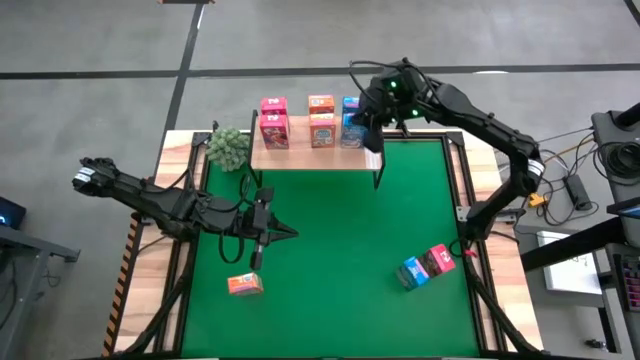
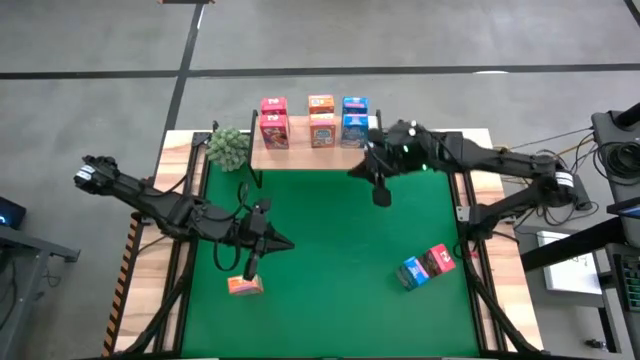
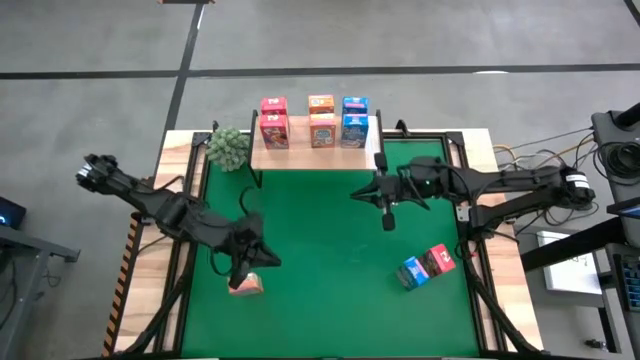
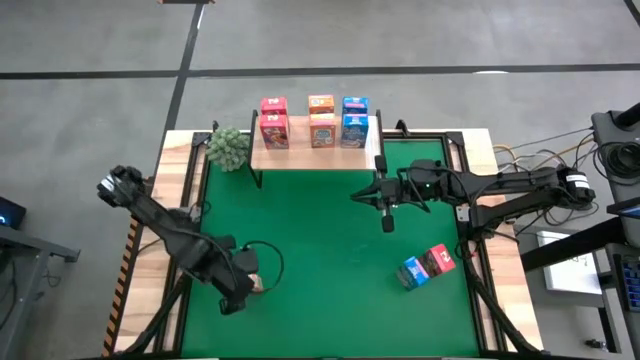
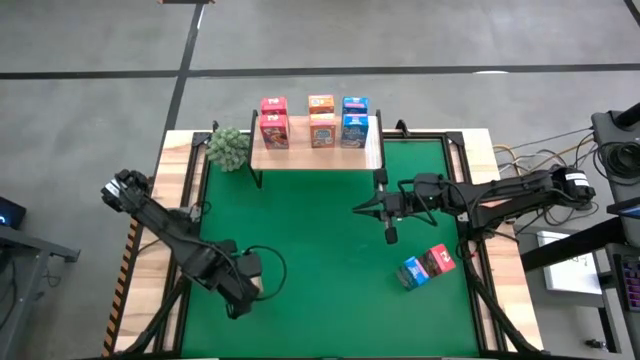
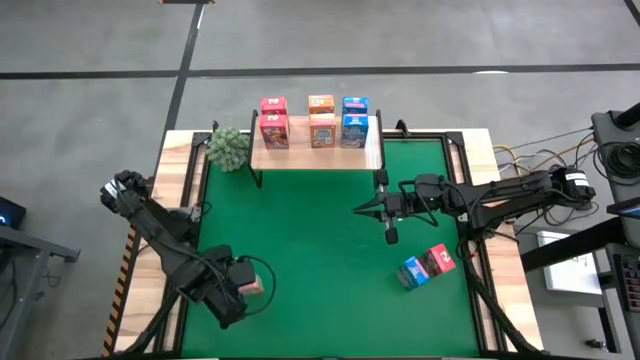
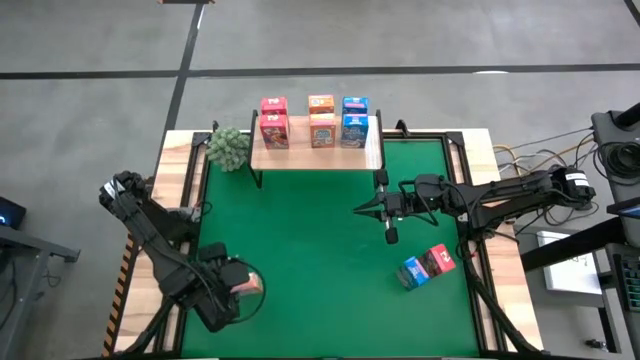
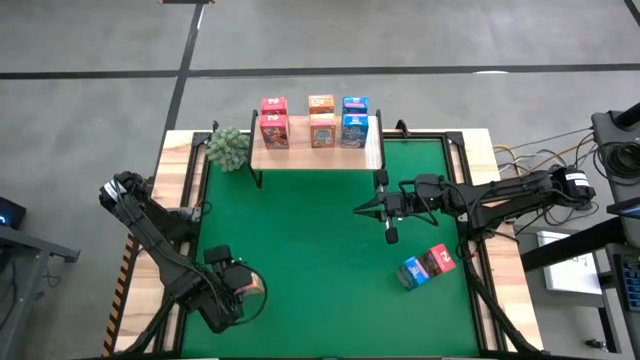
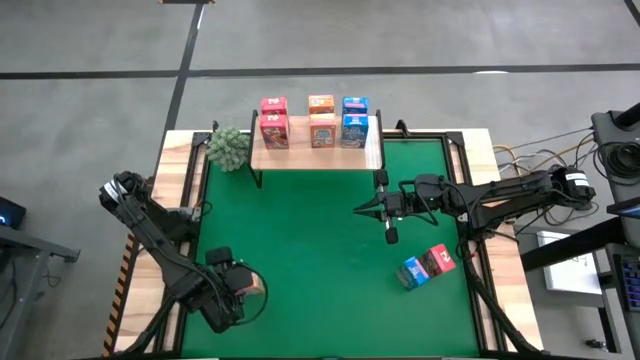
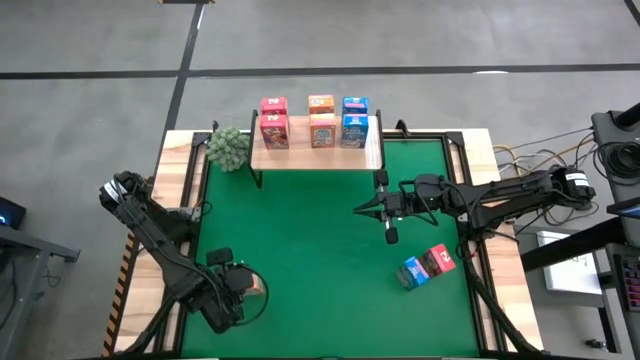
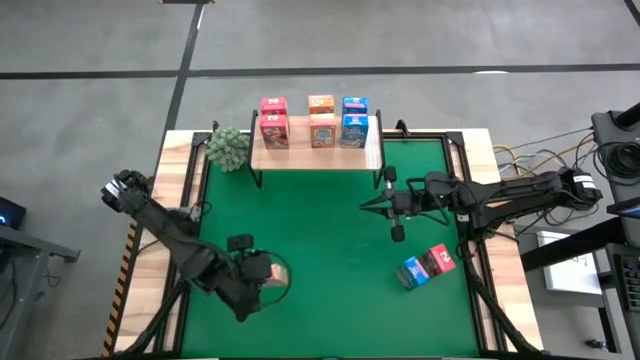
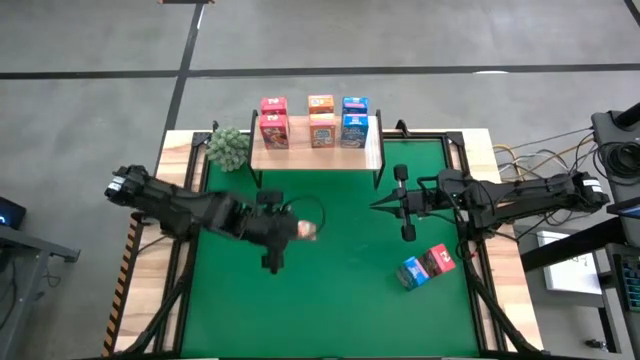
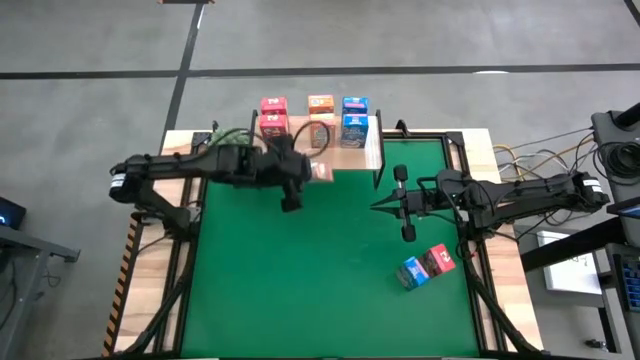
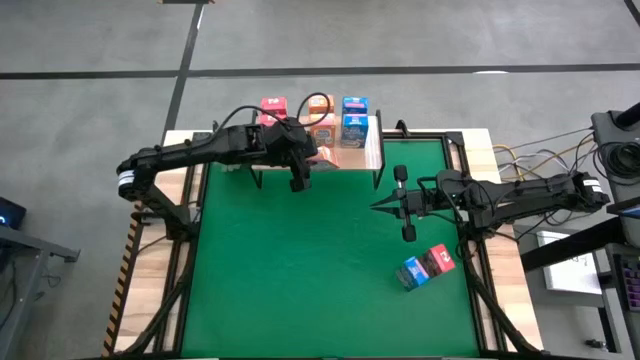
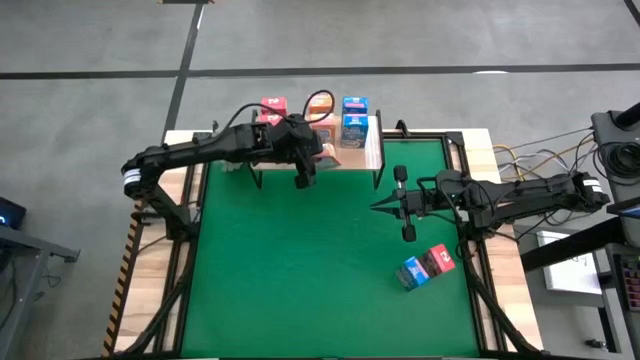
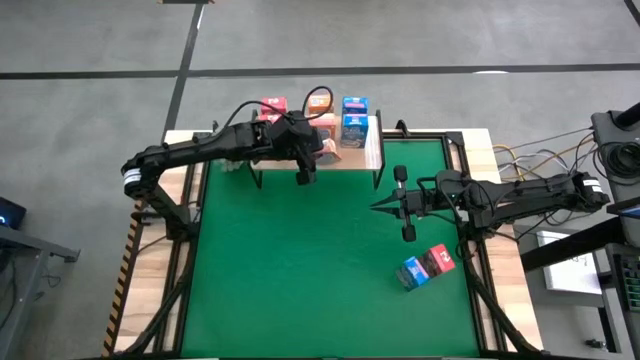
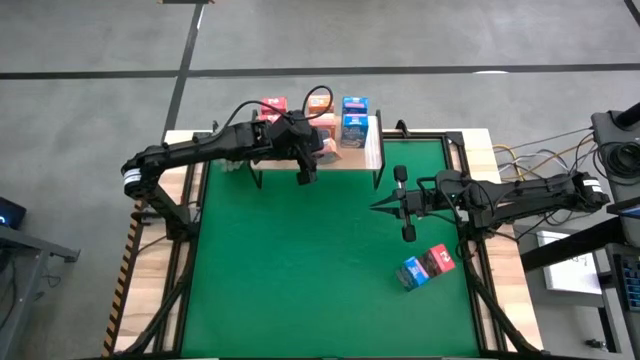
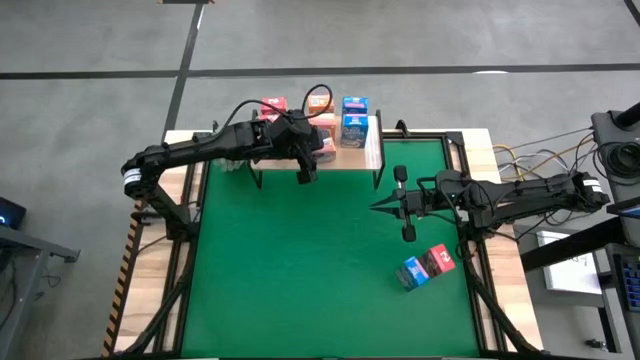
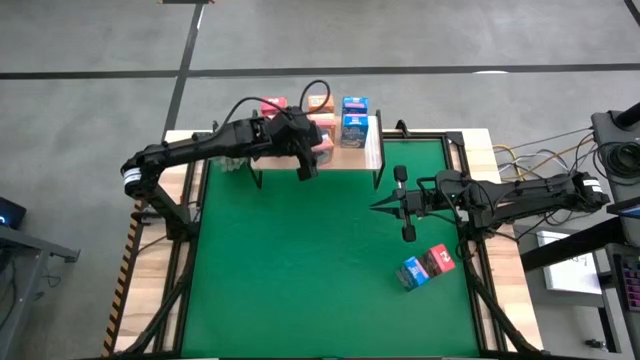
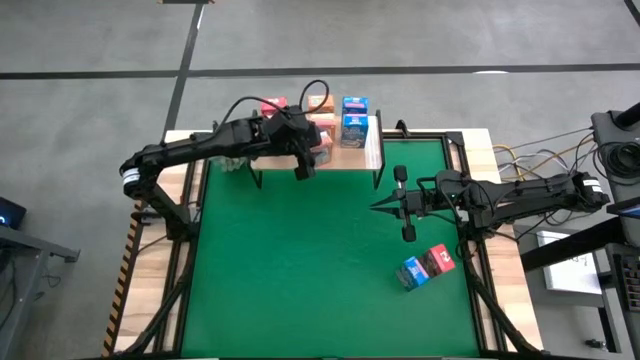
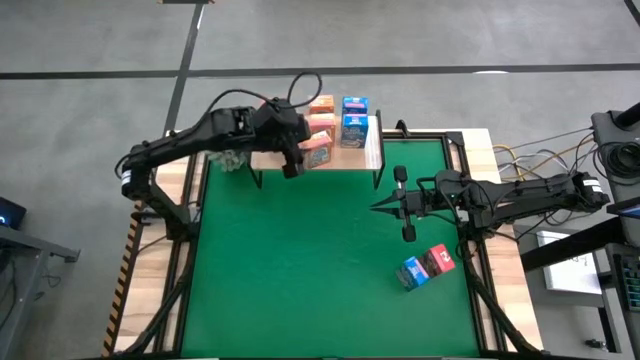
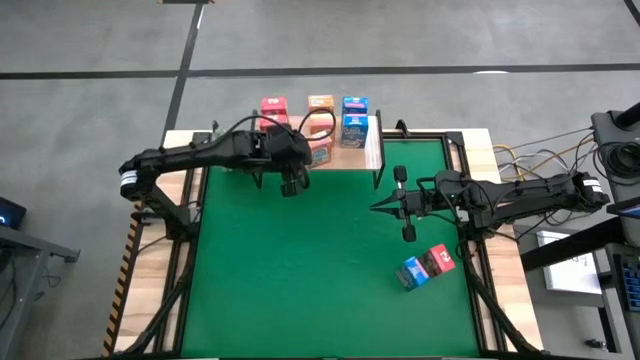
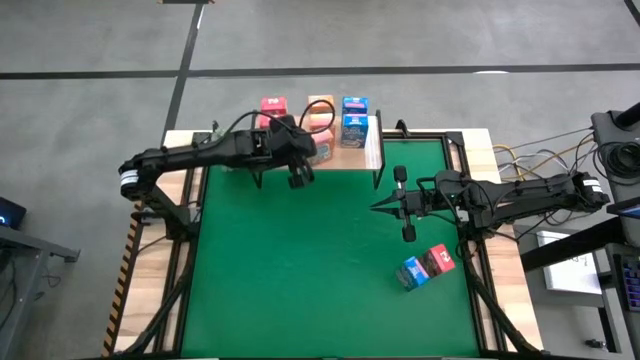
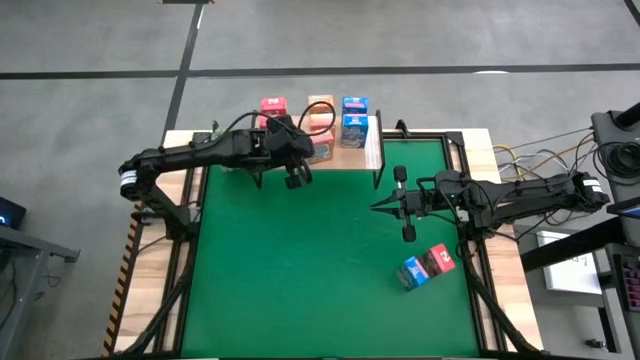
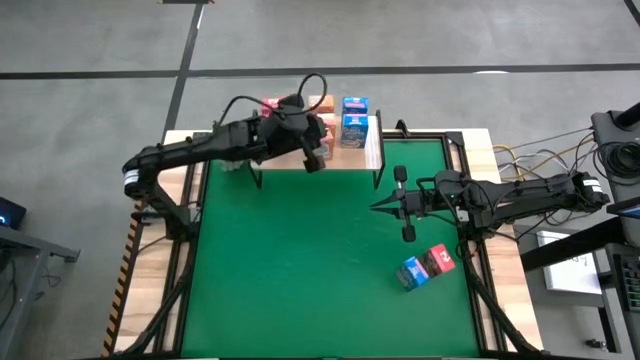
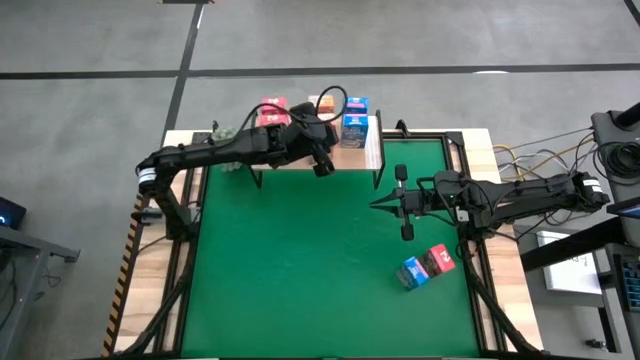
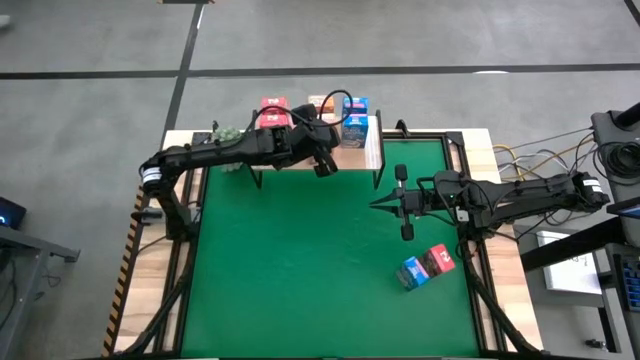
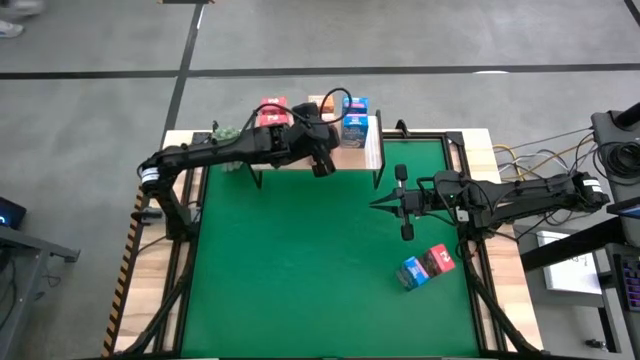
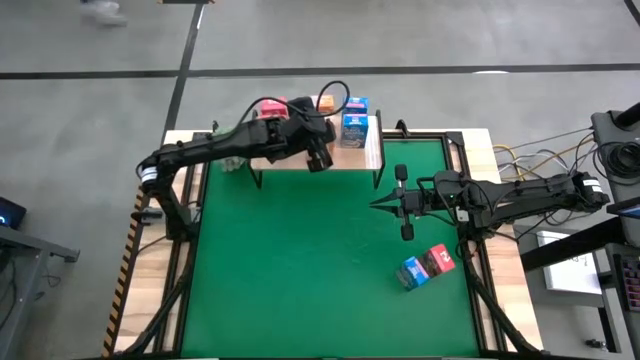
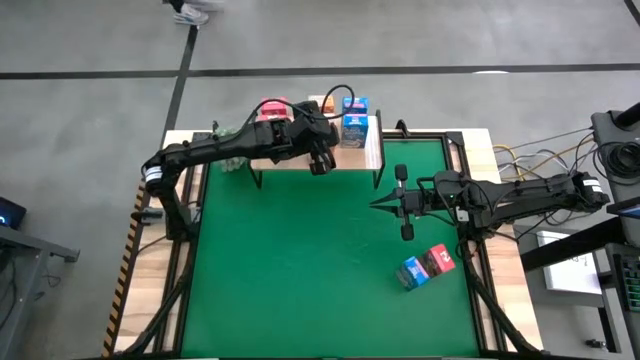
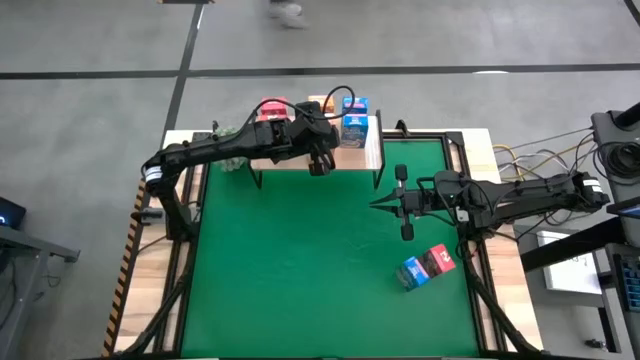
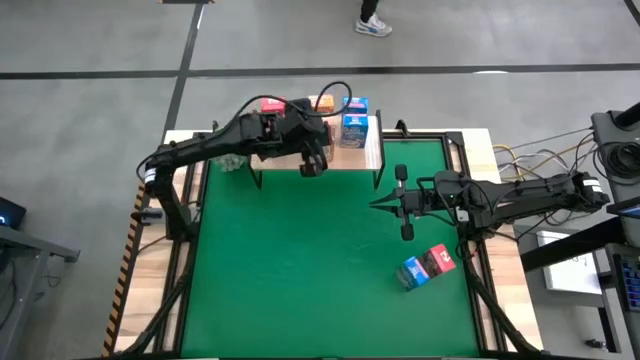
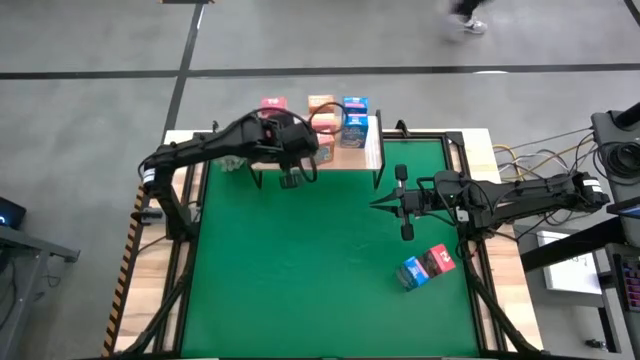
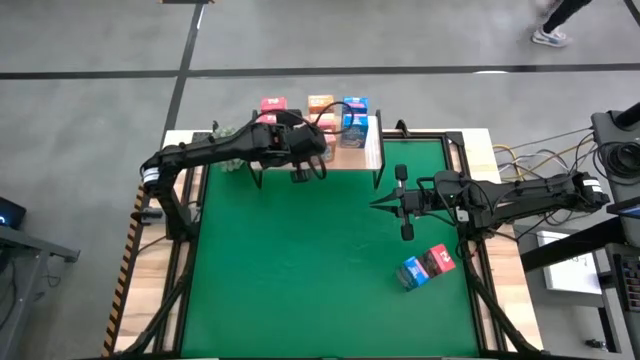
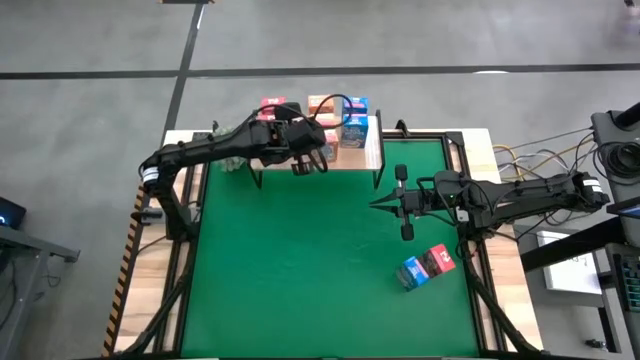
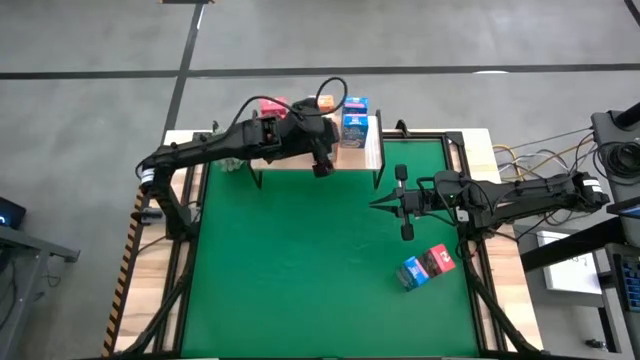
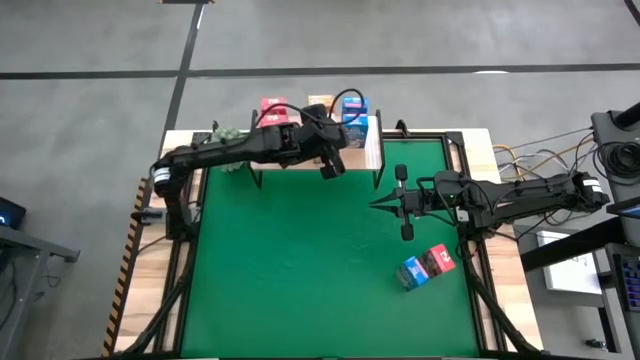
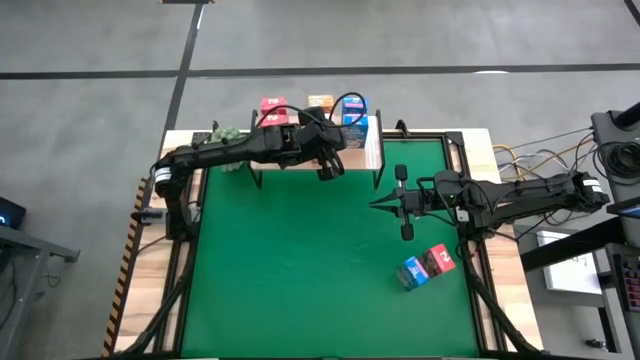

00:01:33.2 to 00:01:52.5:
Task: Stack cereal on shelf
Put the orange cereal box on the shelf aligned with the other orange cereal boxes

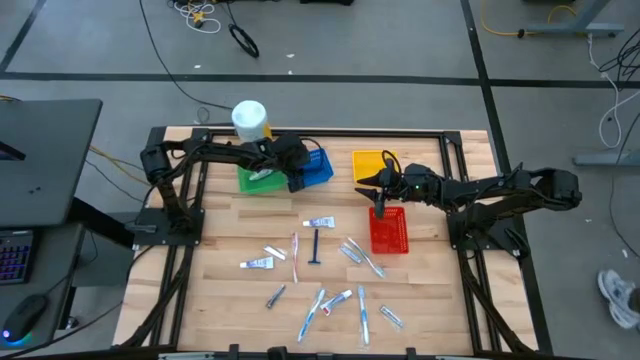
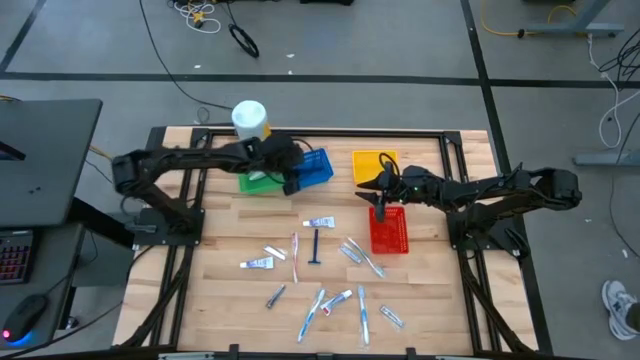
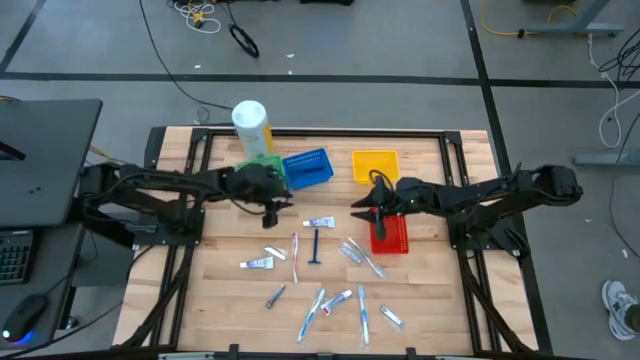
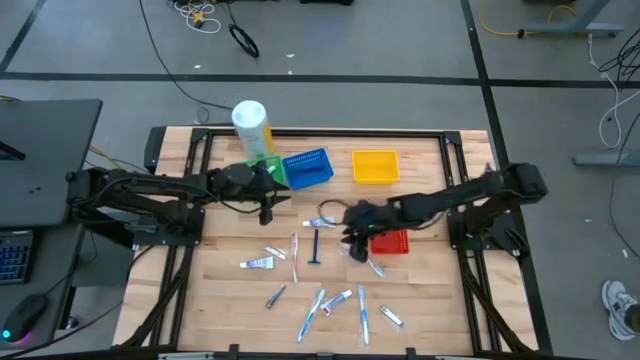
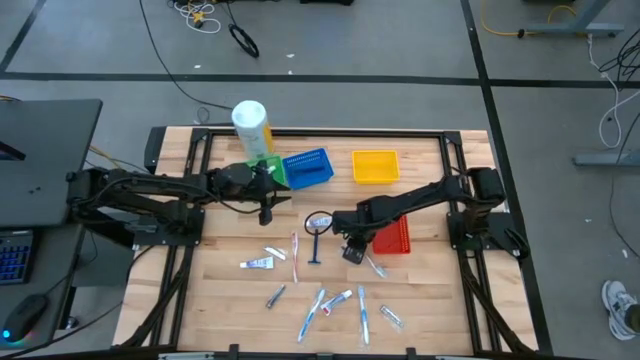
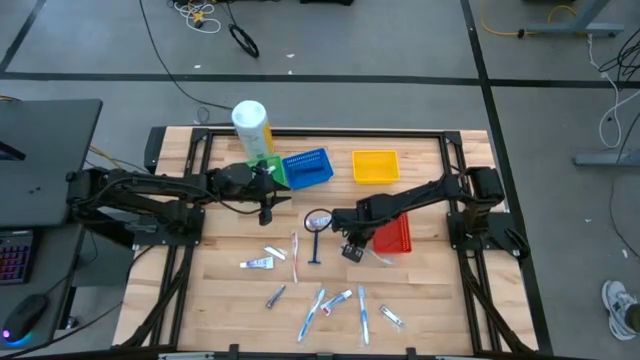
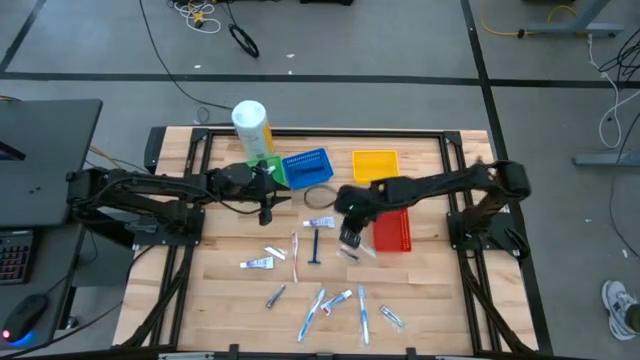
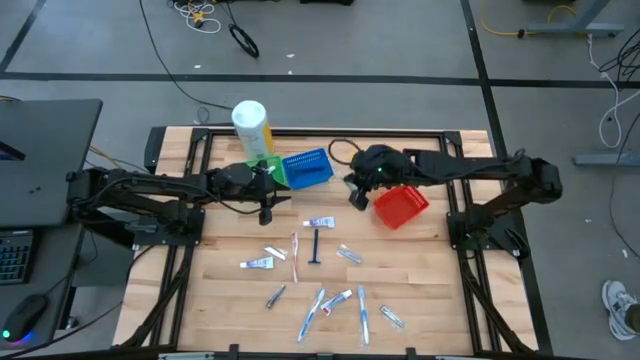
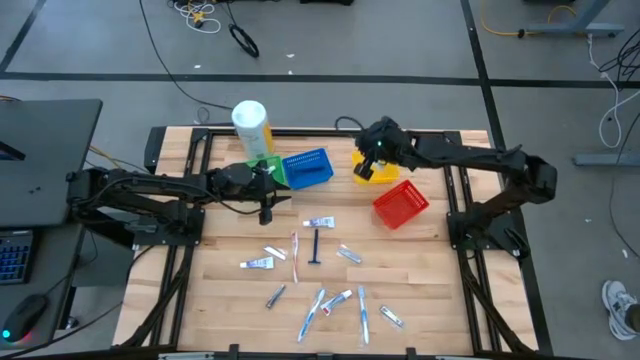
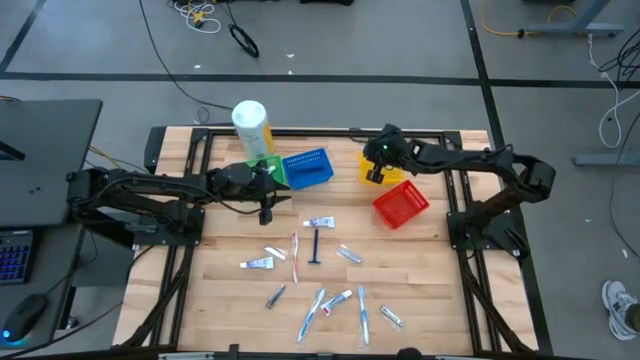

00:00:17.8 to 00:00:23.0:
Task: Pick & Place Travel size toiletries
Put the green toothbrush into the yellow bin
